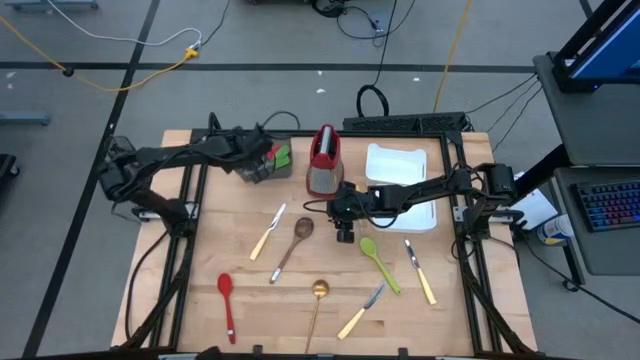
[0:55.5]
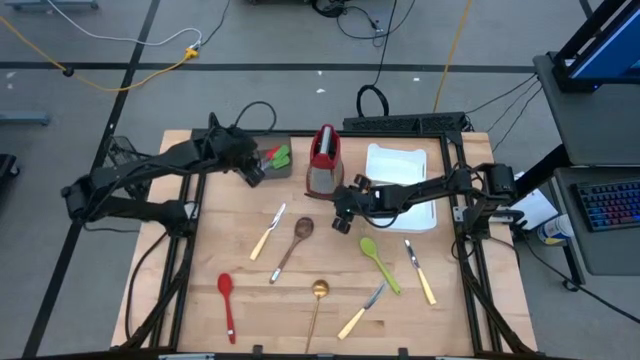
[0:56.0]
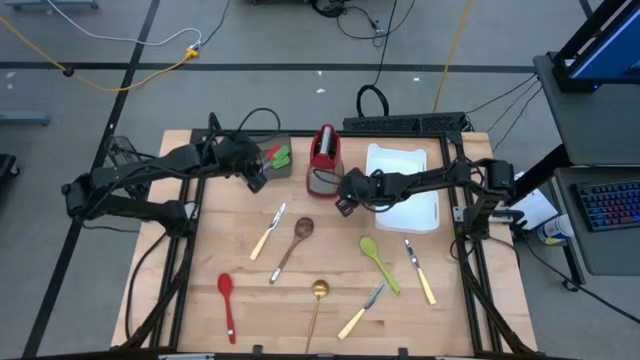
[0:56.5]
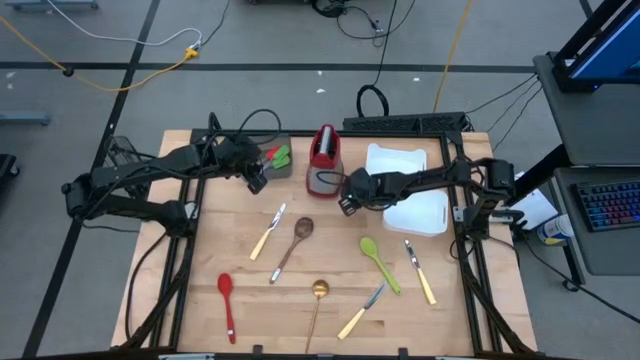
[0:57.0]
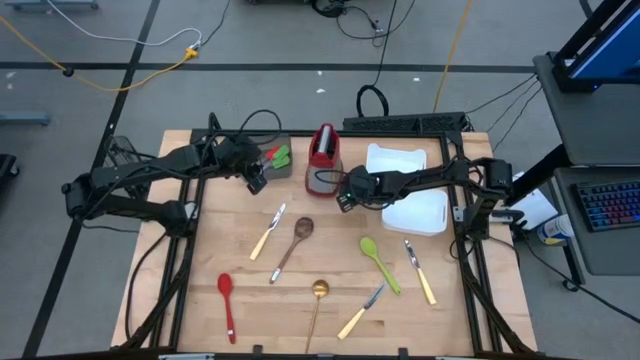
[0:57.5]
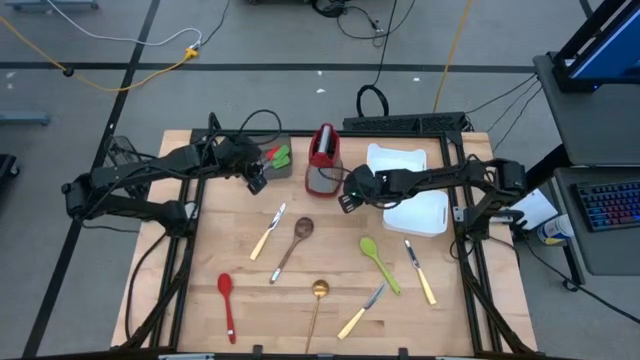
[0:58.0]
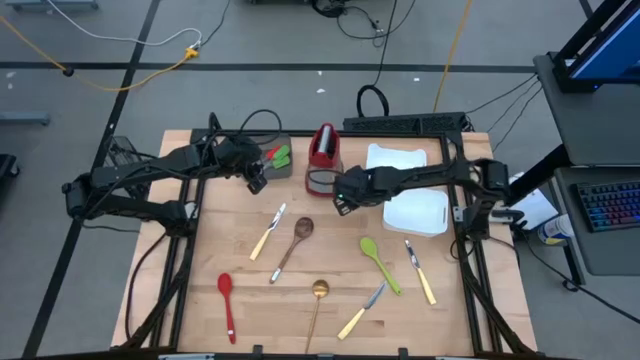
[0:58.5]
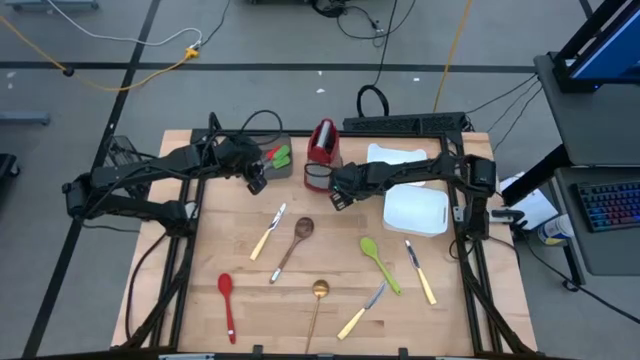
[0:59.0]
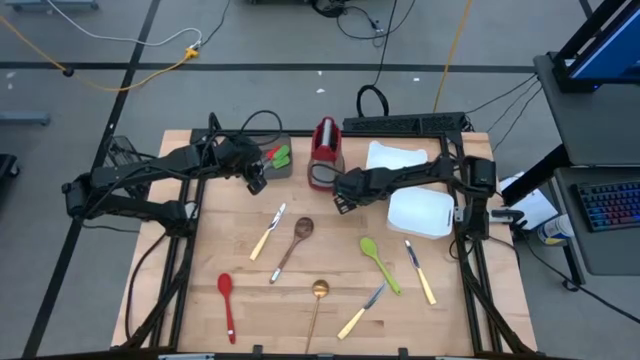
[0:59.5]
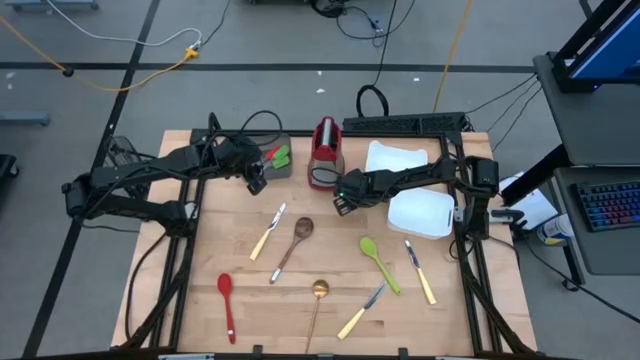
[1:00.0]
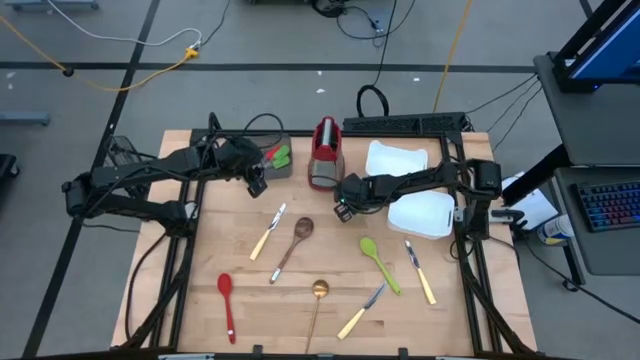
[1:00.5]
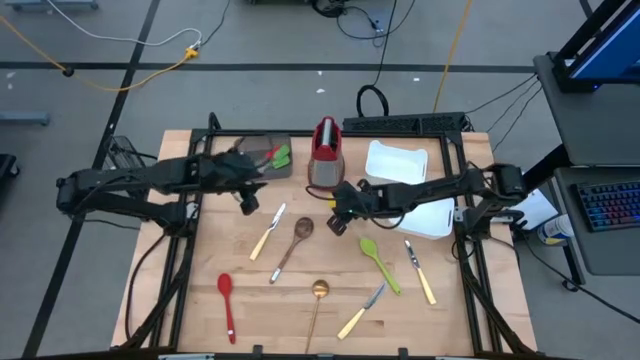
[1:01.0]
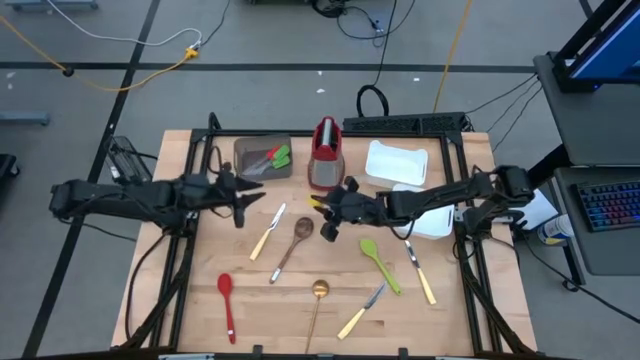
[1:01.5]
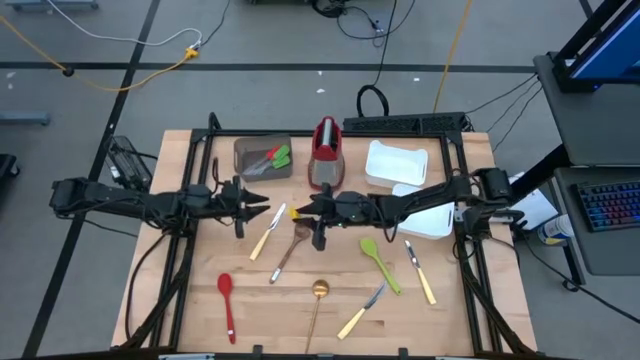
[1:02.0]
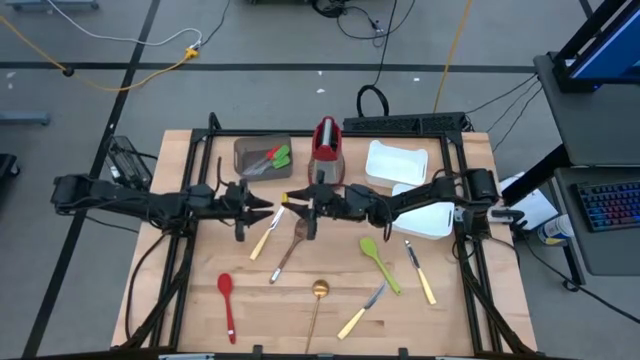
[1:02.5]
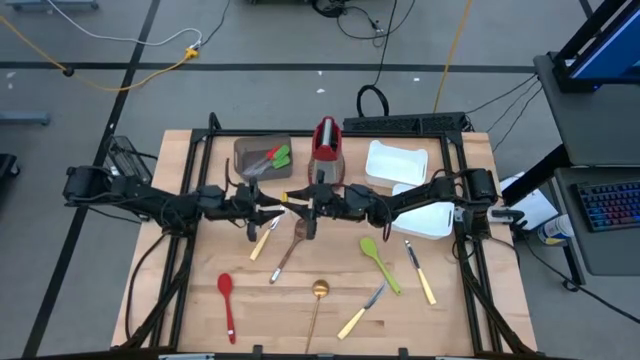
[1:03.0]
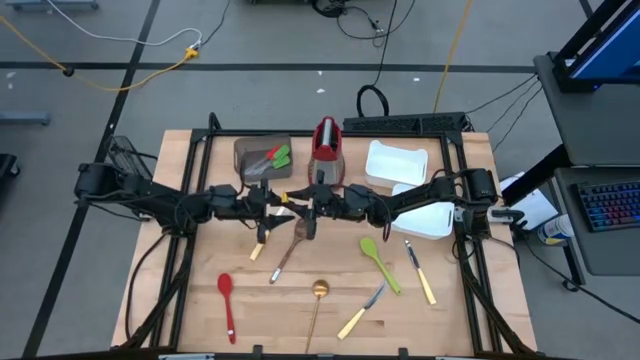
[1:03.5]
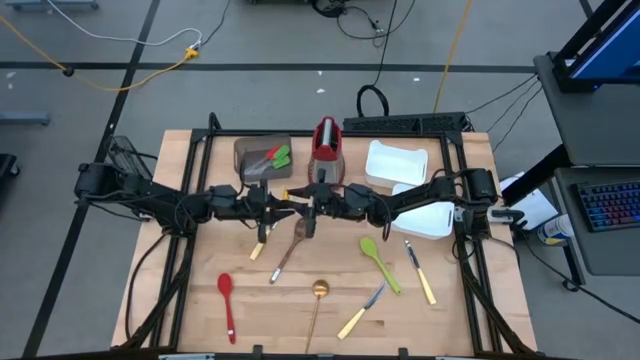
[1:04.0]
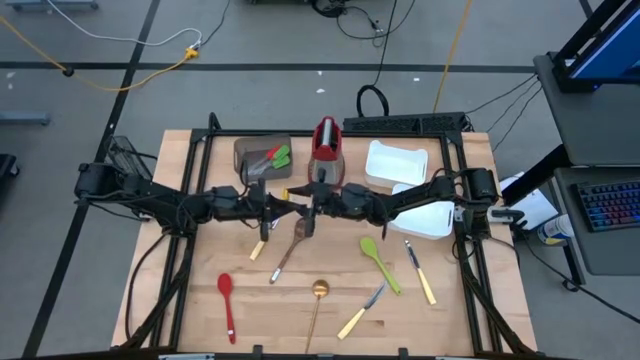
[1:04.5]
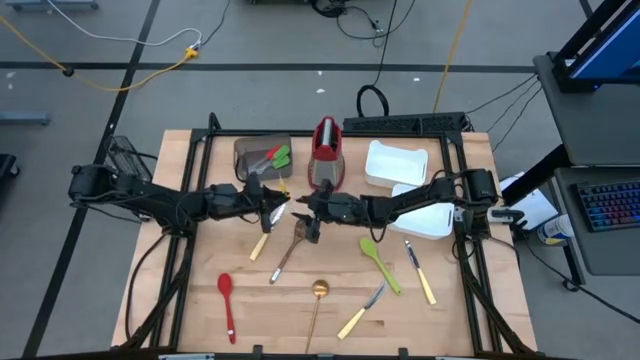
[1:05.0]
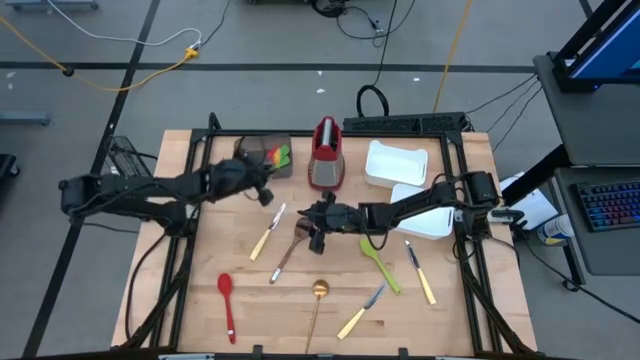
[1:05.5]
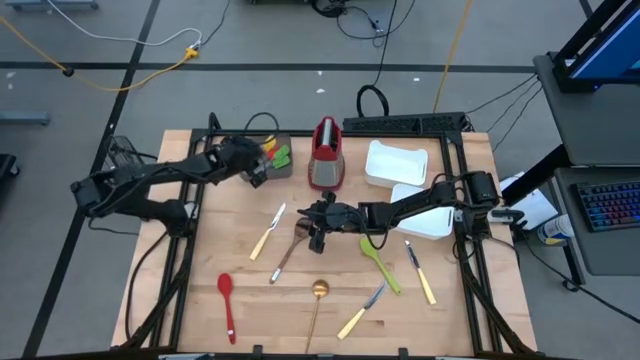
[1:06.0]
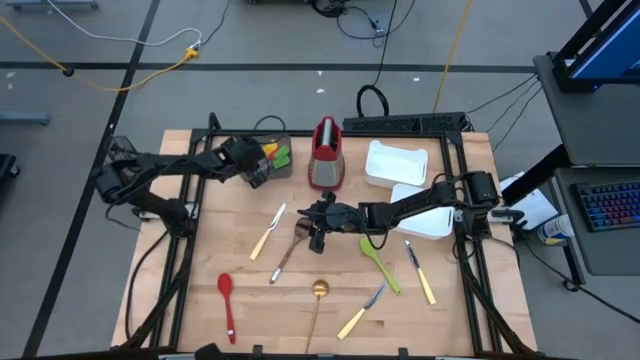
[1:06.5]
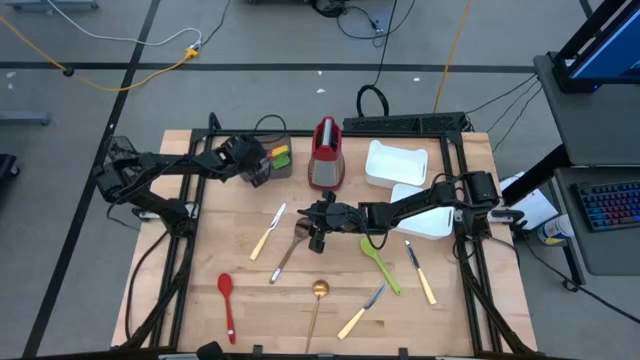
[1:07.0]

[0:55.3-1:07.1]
Task: Pick & Place Kitchen Items
Put the yellow spatula into the black bin

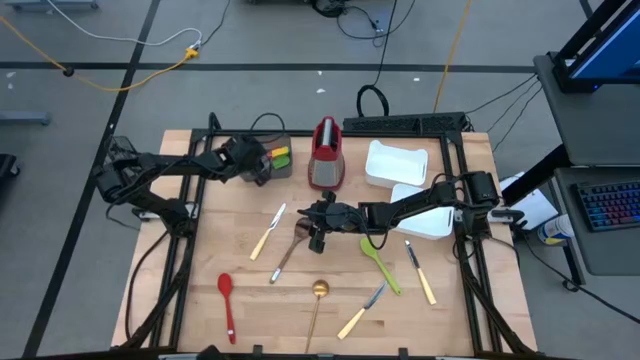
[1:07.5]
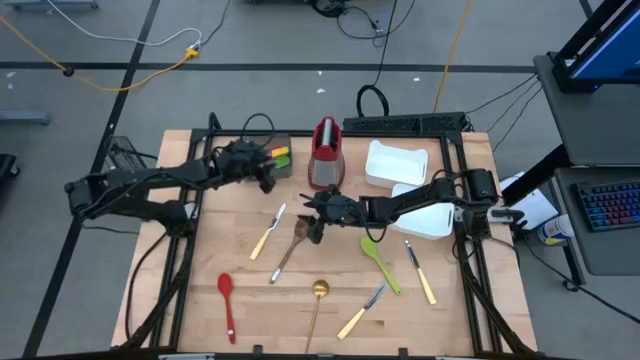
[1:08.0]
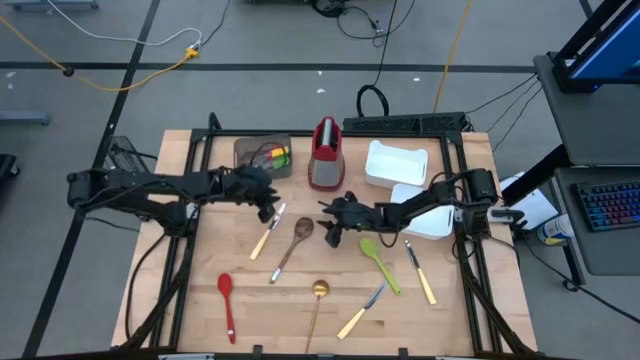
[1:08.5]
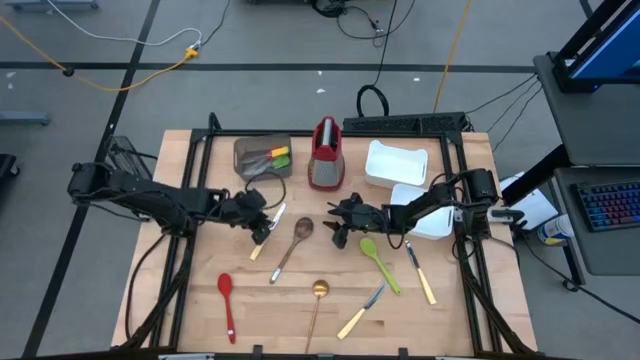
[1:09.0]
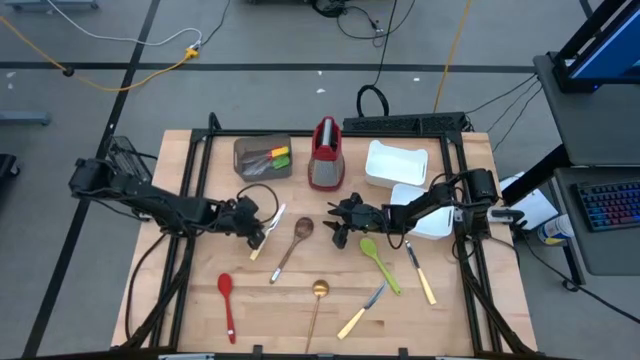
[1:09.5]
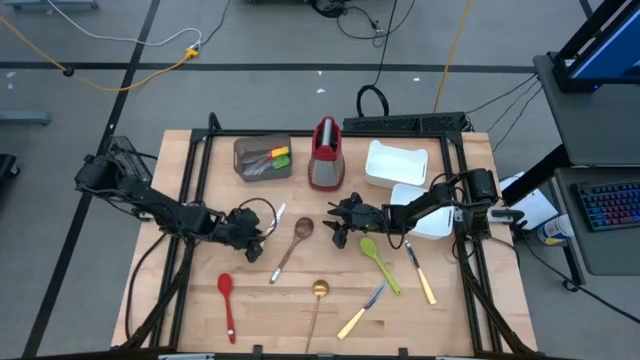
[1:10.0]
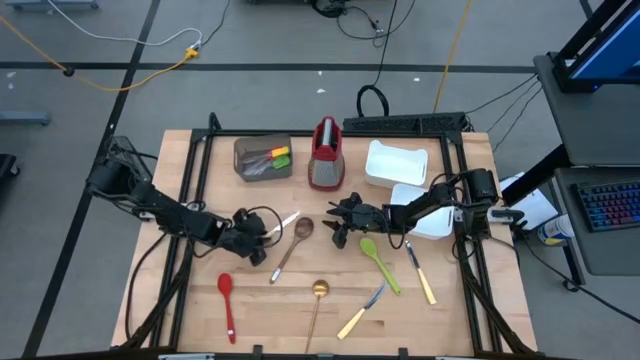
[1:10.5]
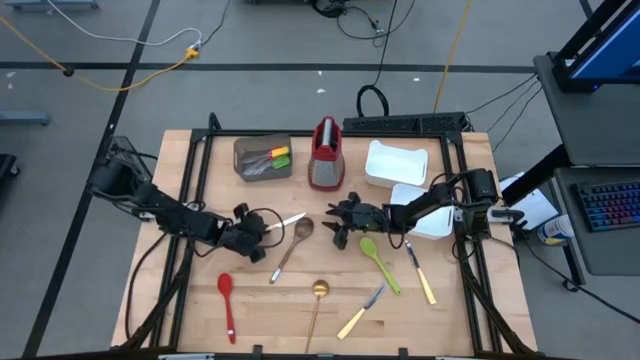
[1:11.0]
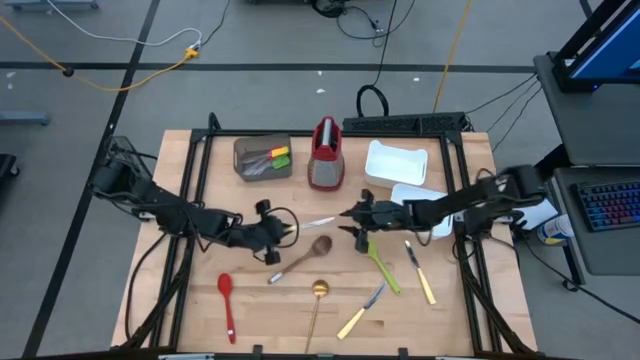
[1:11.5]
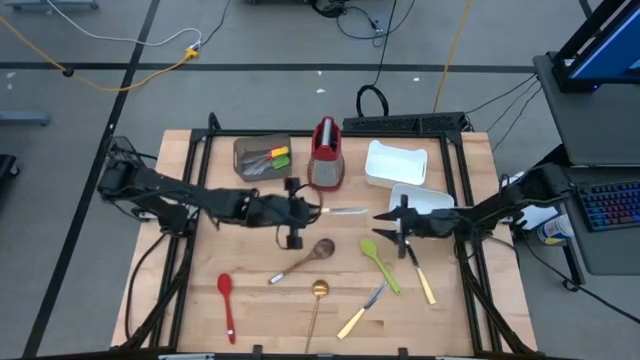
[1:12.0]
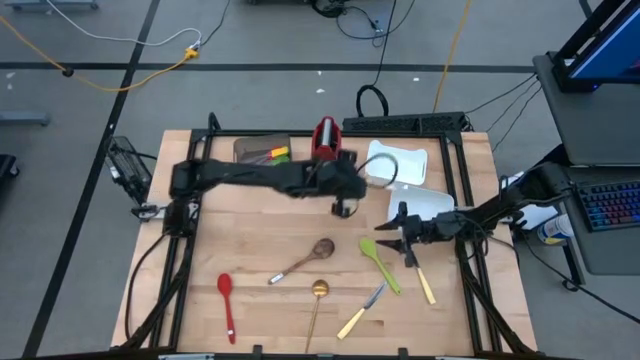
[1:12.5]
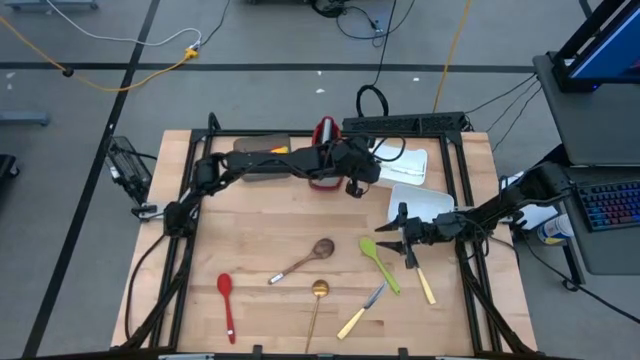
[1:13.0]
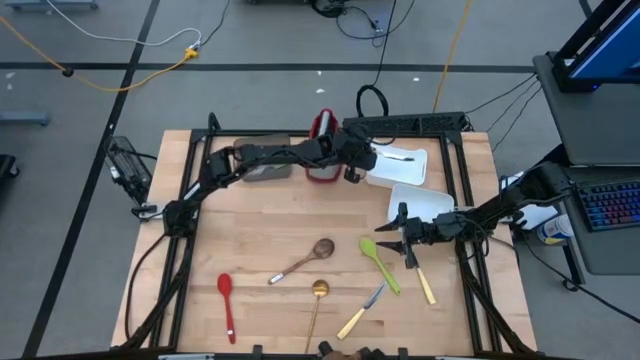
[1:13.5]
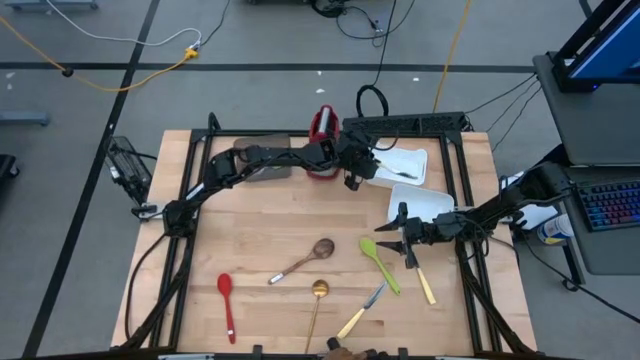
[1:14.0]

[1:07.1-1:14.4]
Put the top left yellow table knife into the top white bin

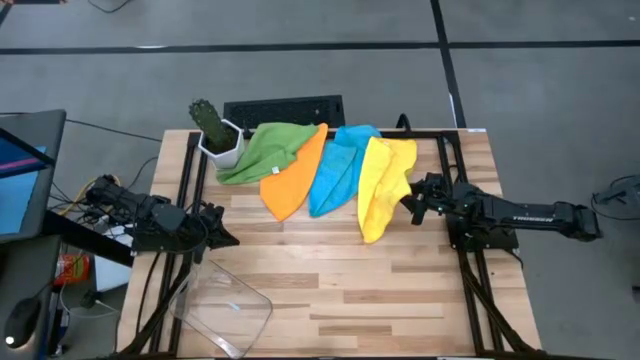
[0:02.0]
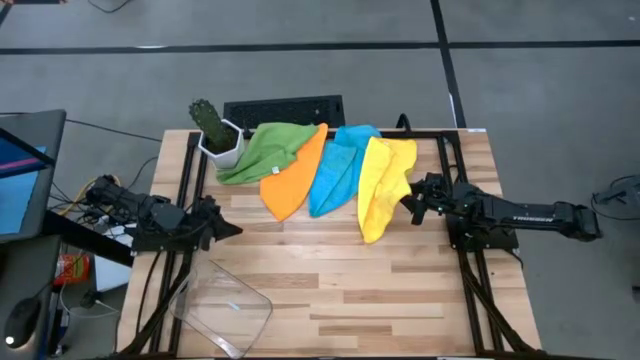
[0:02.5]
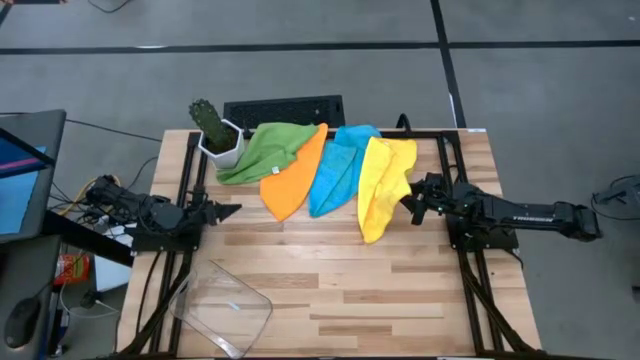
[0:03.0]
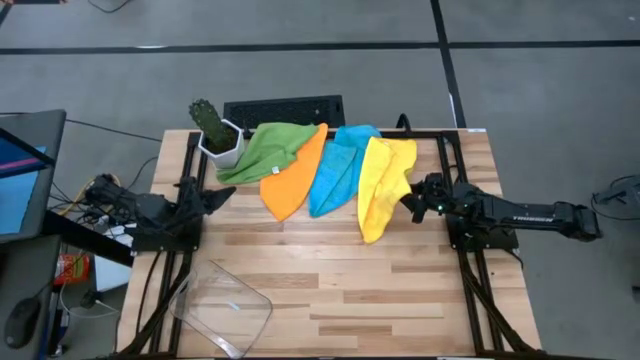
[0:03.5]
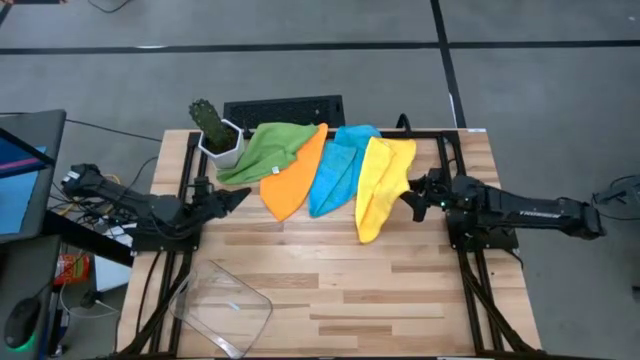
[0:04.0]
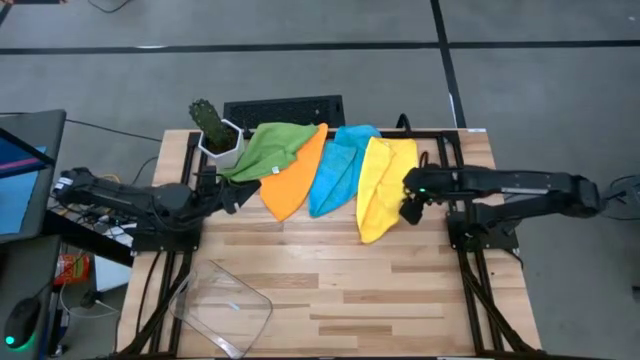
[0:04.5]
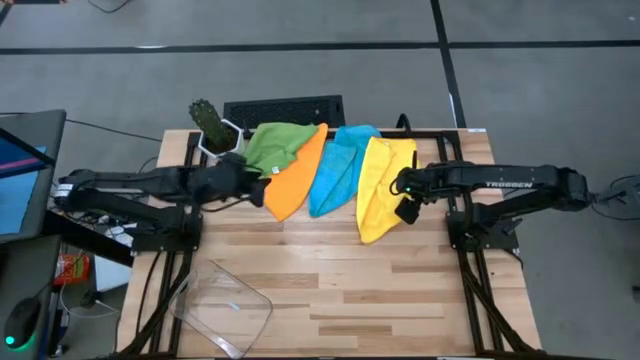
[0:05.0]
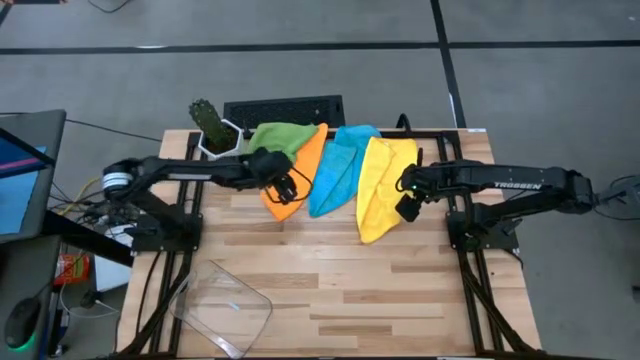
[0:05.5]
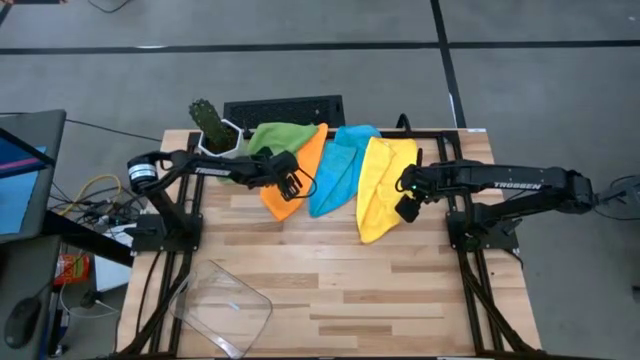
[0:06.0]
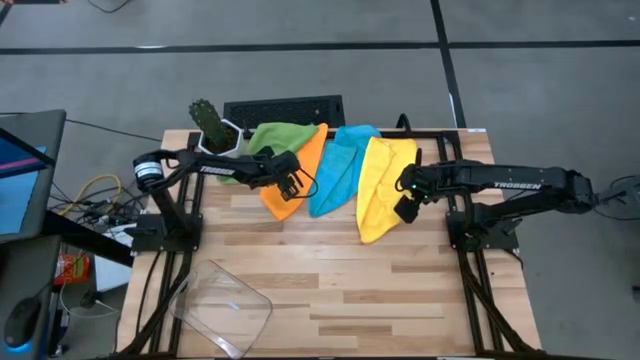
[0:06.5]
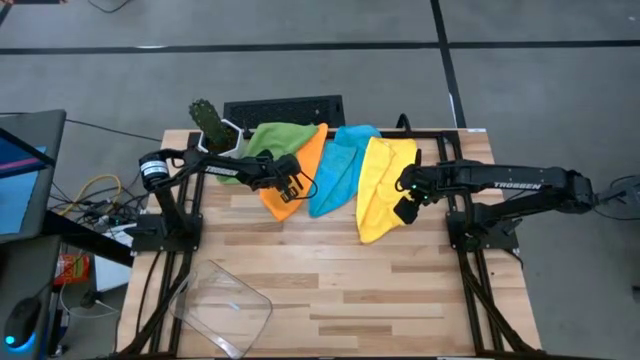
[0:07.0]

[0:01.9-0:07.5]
Task: Fold microfiber towels
Fold the green microfiber towel
